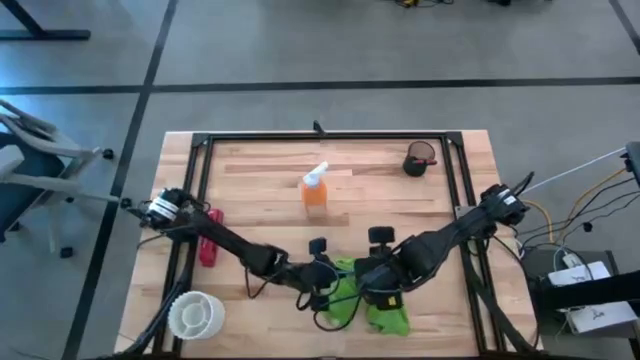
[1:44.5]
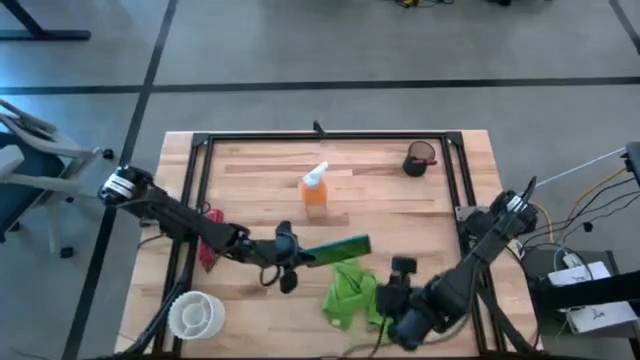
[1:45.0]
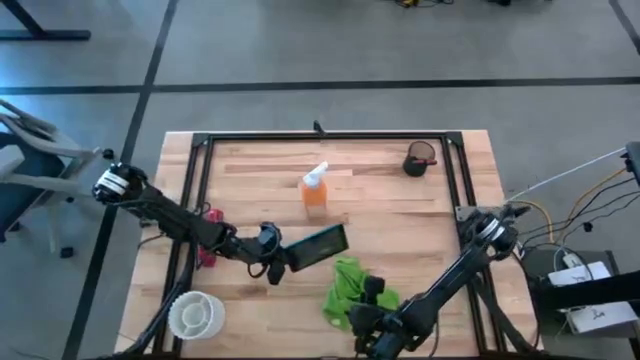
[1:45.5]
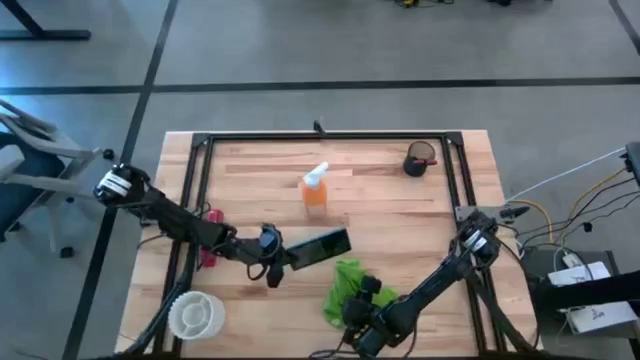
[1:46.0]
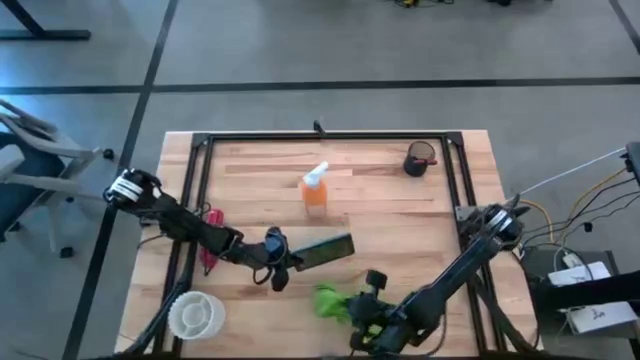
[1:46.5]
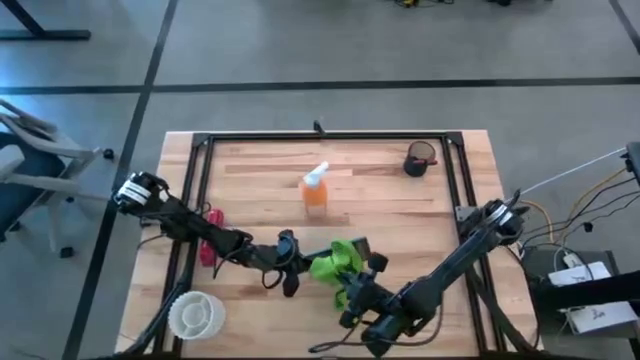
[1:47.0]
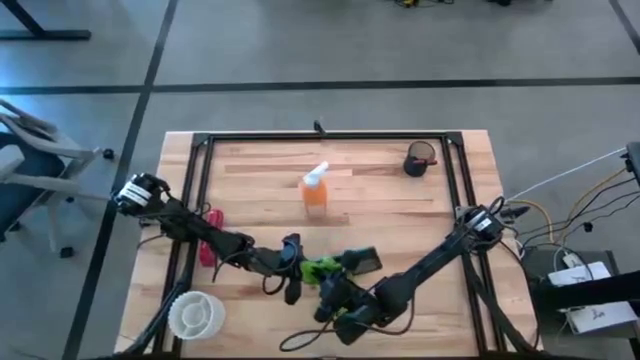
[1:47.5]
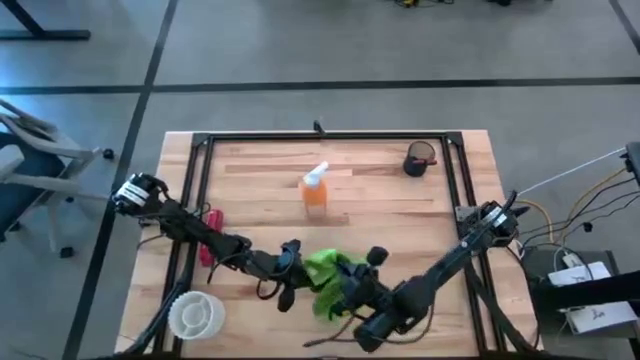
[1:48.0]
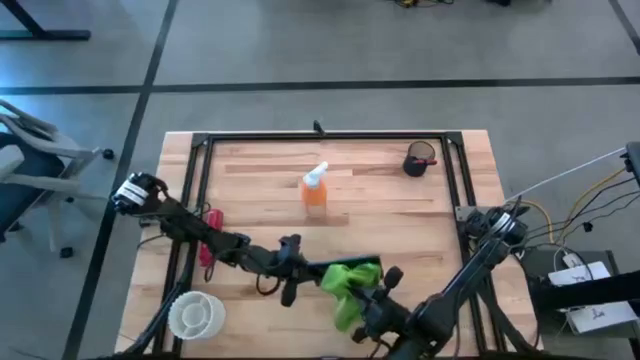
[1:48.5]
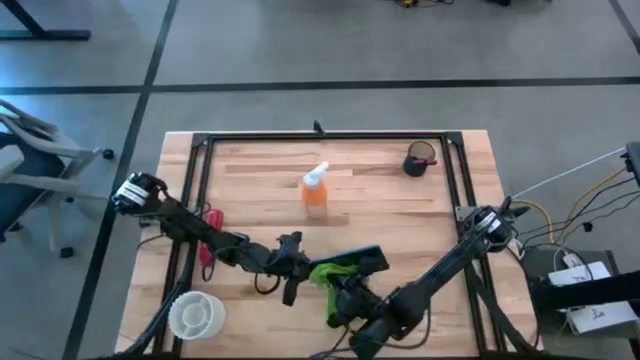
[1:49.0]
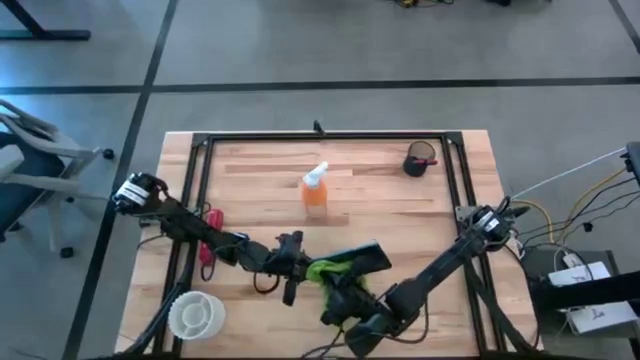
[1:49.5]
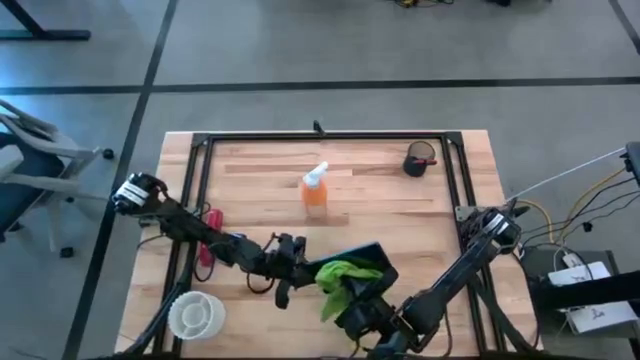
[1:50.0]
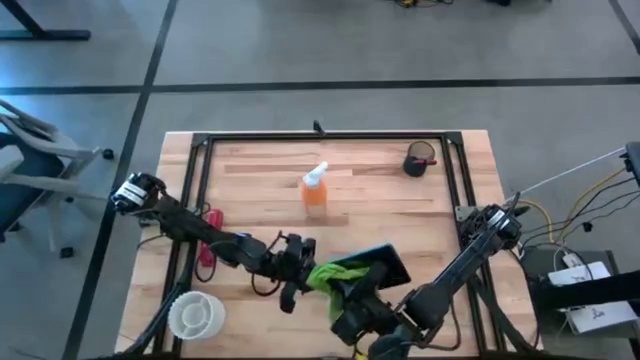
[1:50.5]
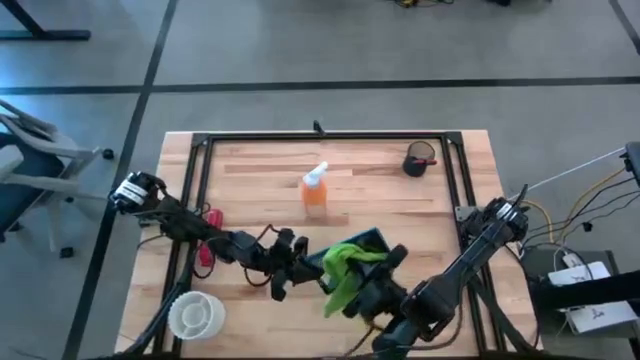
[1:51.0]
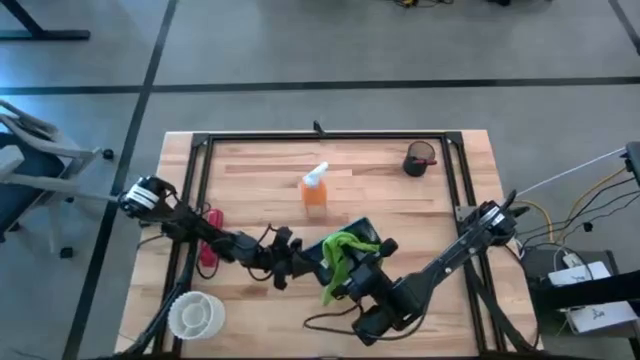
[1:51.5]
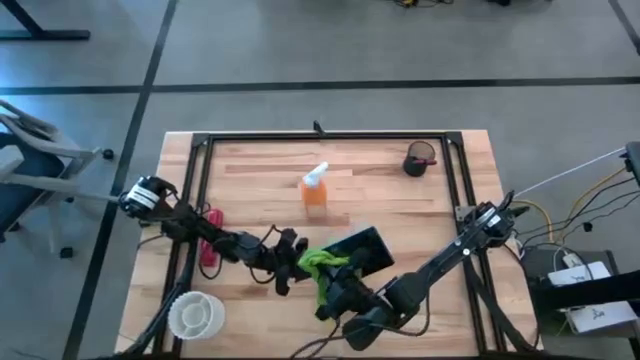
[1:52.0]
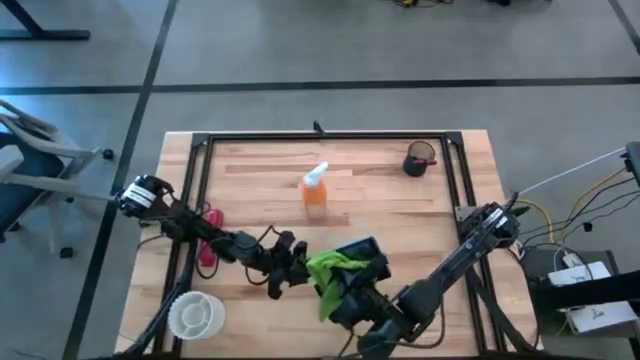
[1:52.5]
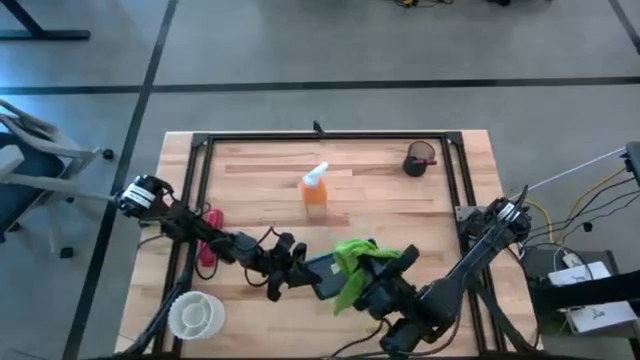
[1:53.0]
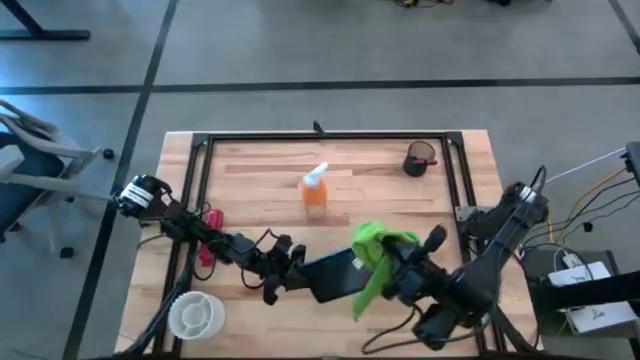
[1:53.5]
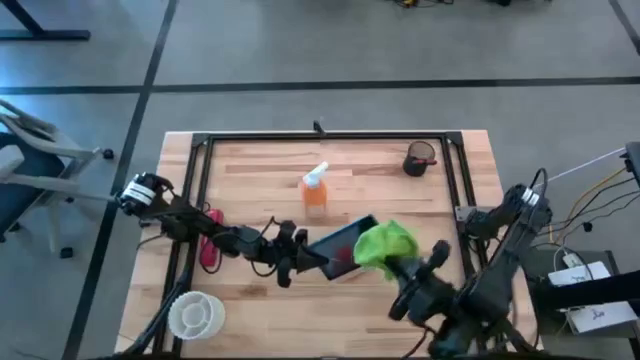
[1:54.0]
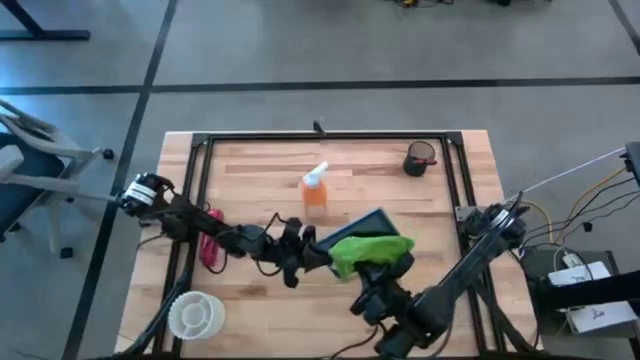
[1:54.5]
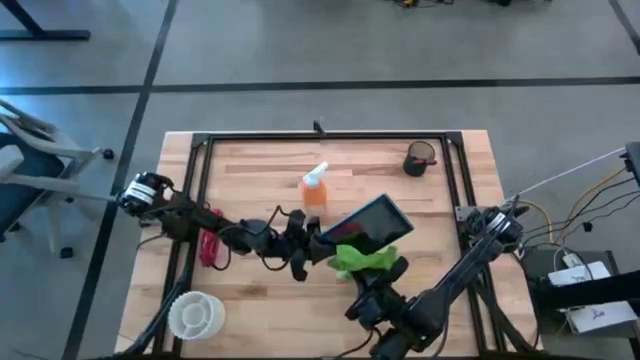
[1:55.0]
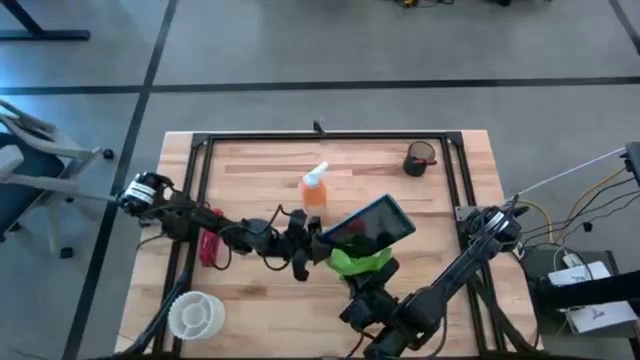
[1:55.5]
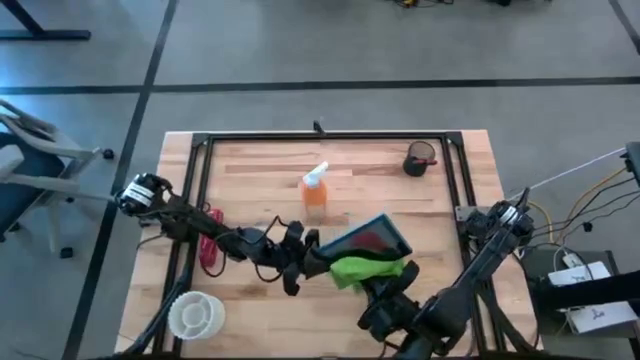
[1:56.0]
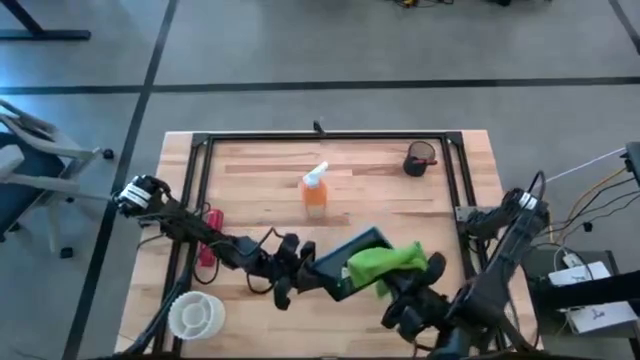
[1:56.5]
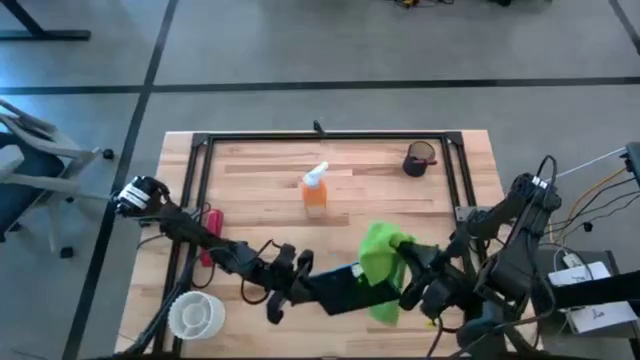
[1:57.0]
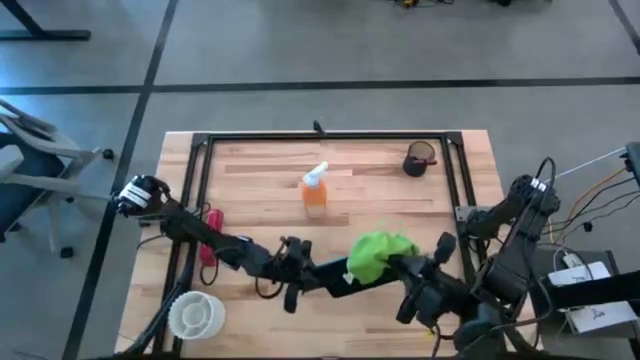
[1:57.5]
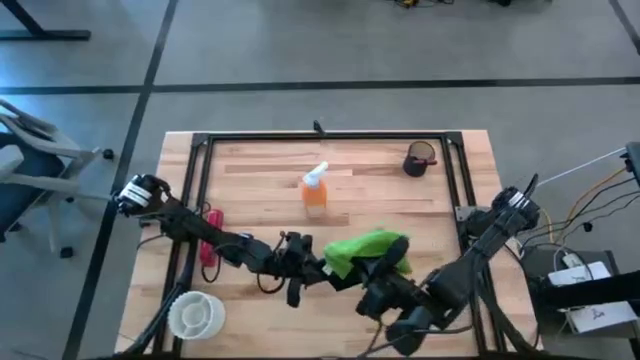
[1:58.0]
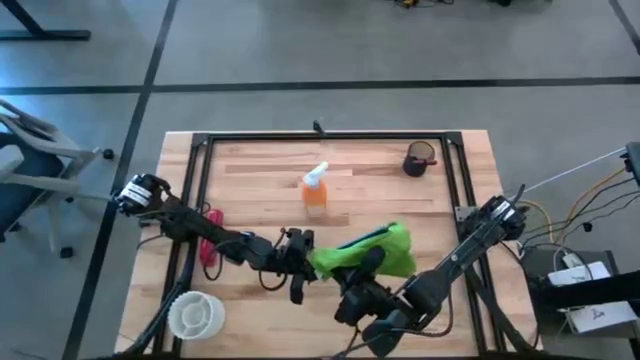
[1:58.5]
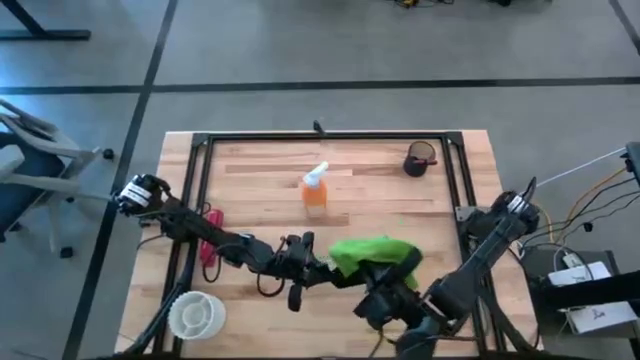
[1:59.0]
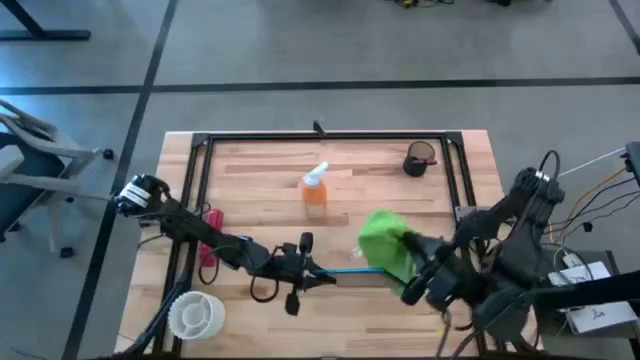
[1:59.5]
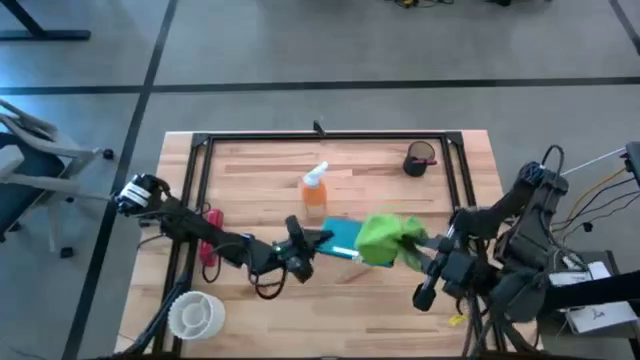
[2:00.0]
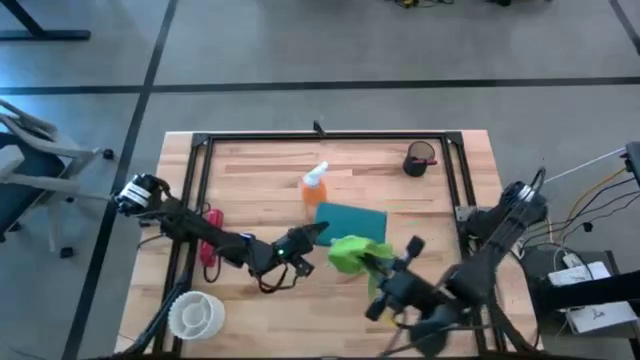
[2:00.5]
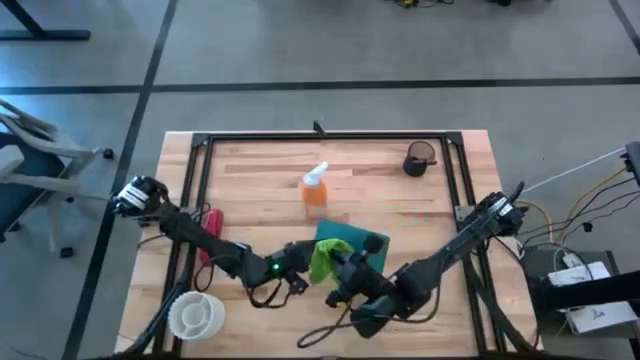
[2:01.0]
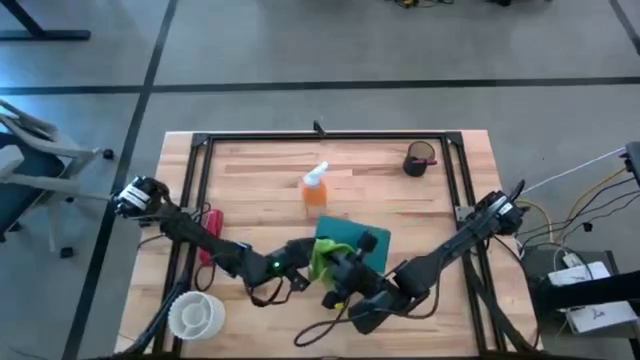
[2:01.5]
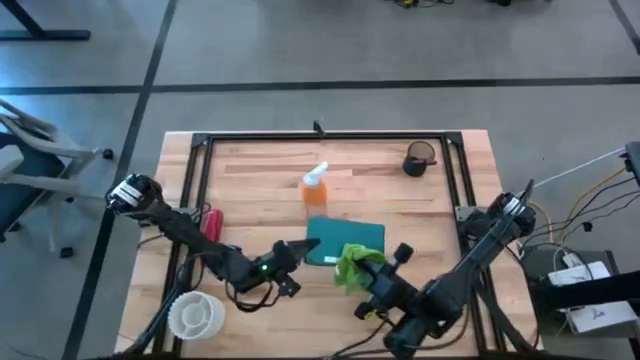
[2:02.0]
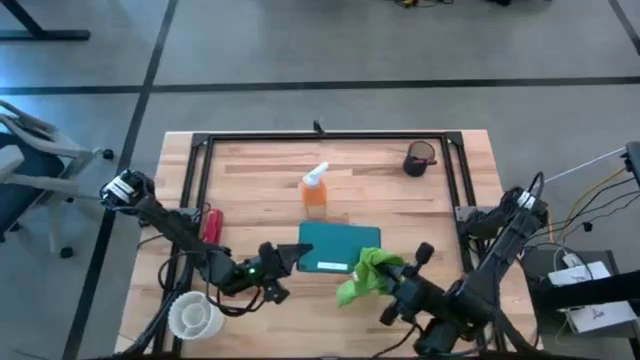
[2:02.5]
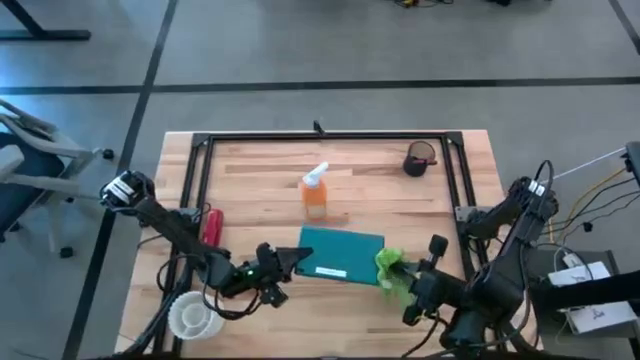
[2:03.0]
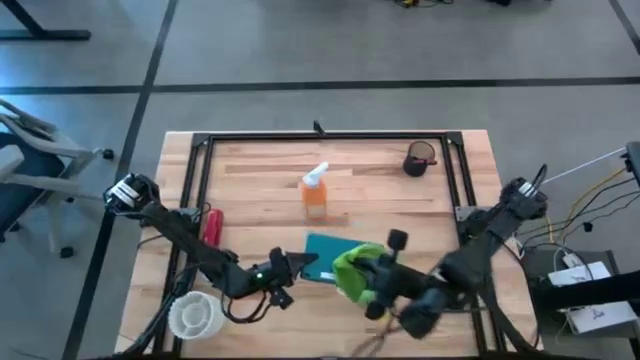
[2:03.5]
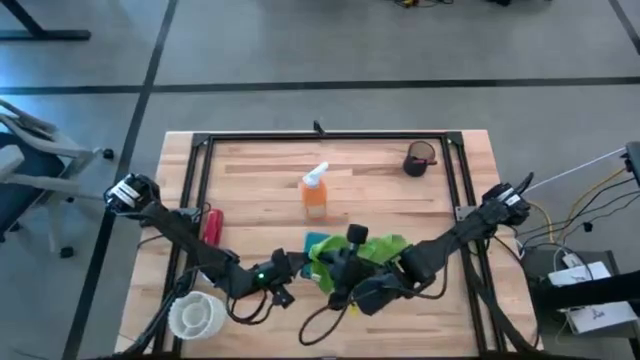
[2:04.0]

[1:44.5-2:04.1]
Task: Apply microfiber cloth
Wipe the front and back of the blue cellphone with the green microfiber cloth

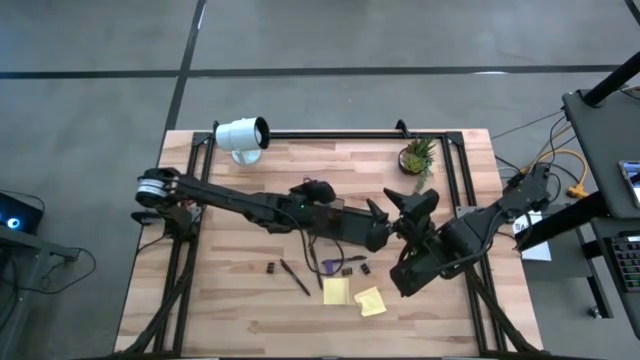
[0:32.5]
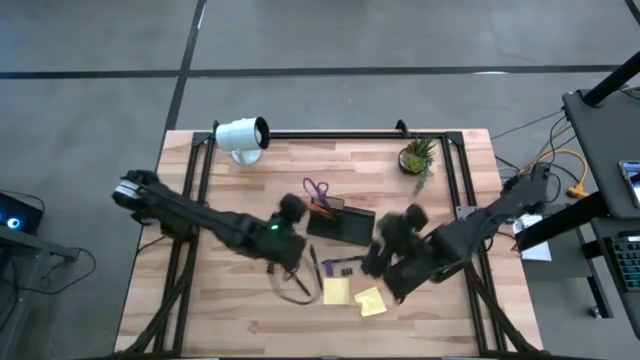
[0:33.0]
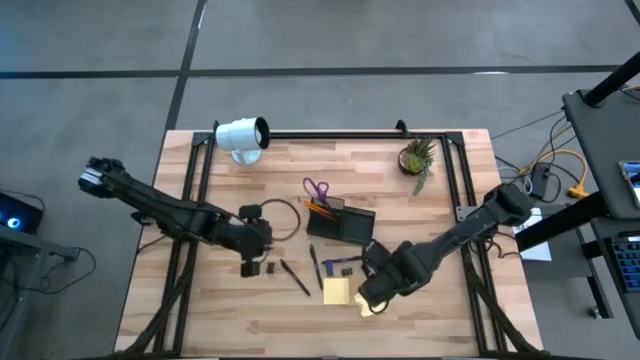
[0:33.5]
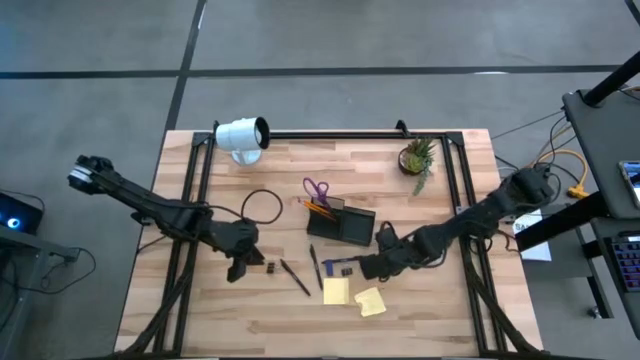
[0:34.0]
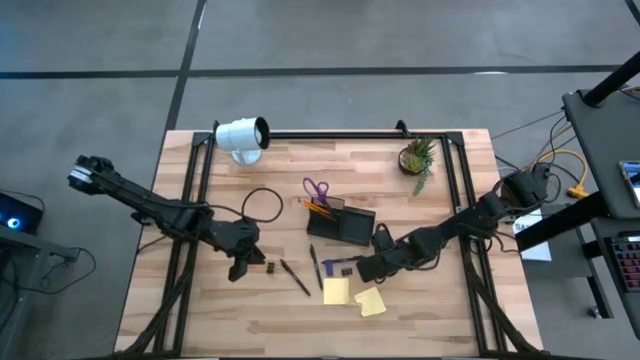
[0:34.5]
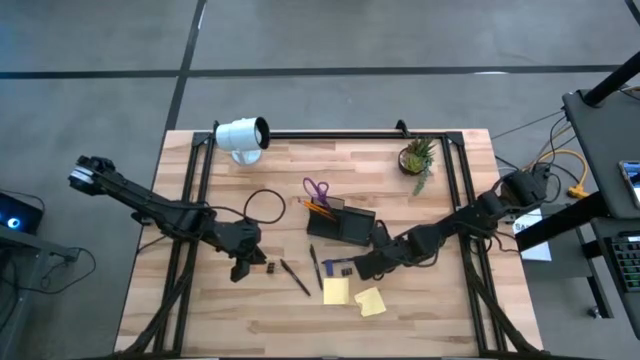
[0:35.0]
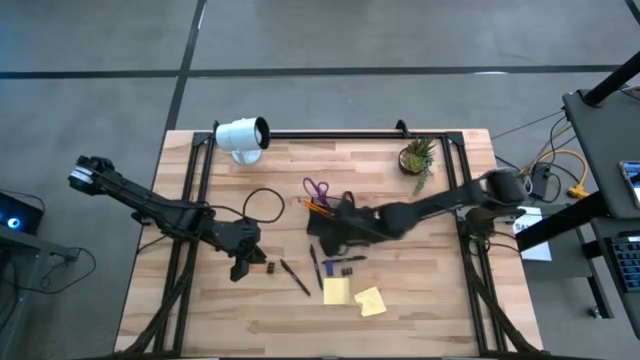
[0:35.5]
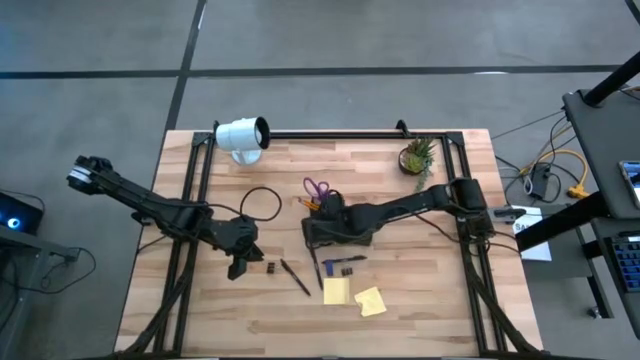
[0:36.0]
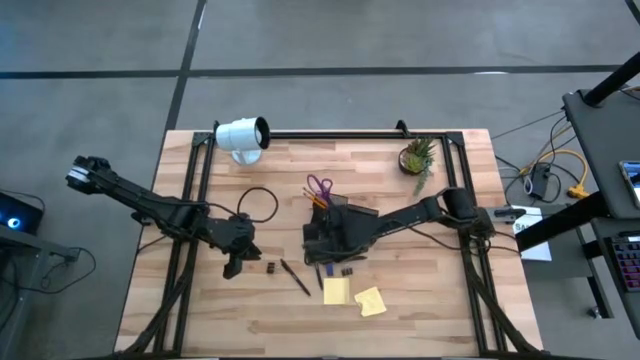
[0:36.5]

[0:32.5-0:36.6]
Task: Pick and place office supplies into organizer
Put the right black binder clip into the black desk organizer
